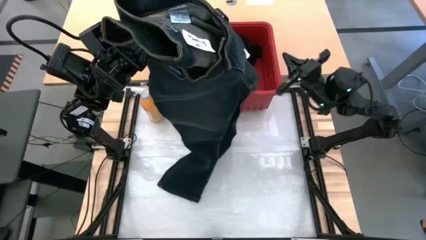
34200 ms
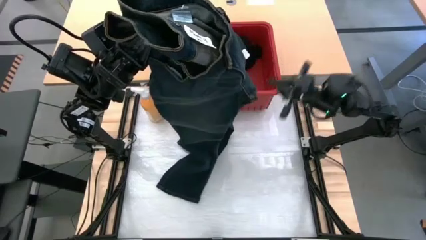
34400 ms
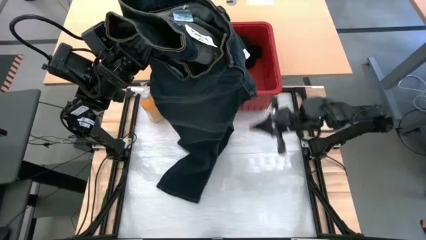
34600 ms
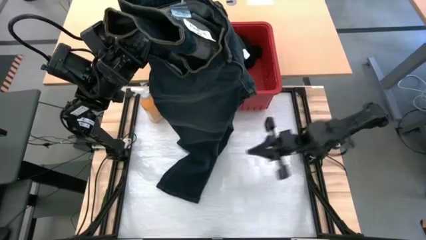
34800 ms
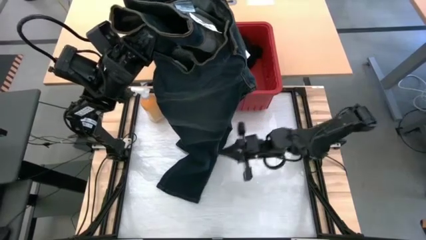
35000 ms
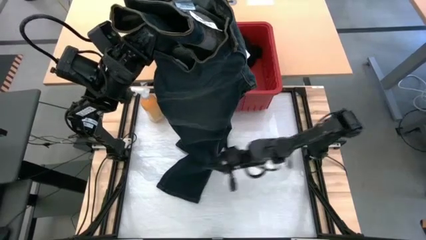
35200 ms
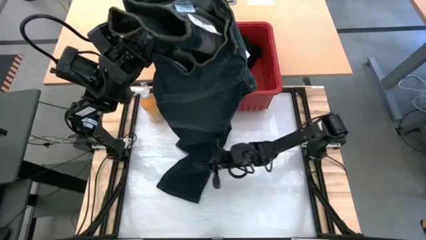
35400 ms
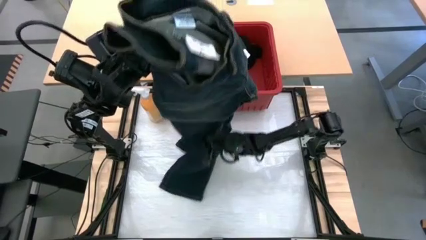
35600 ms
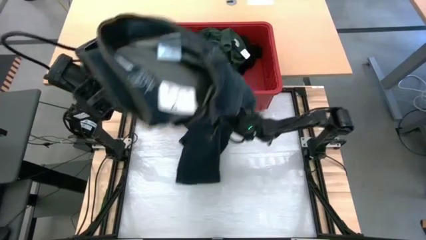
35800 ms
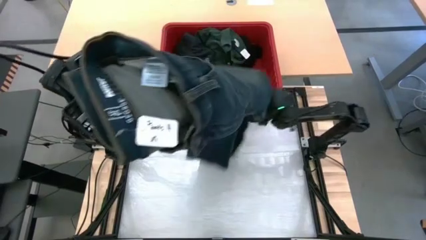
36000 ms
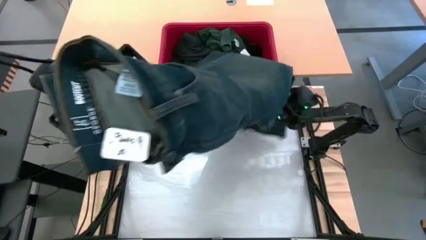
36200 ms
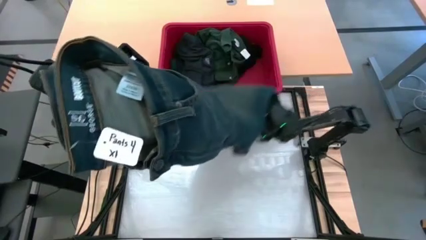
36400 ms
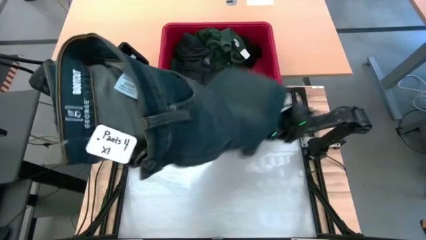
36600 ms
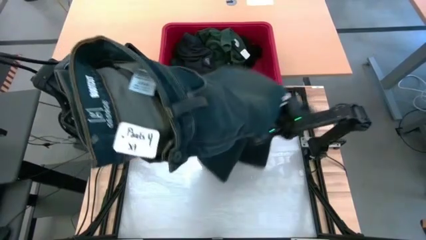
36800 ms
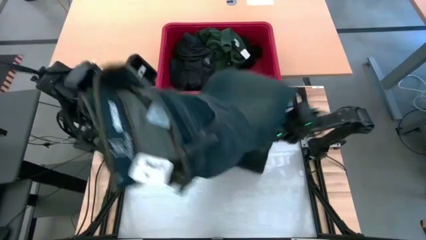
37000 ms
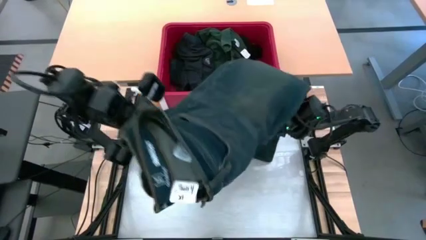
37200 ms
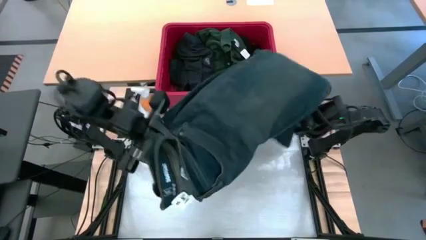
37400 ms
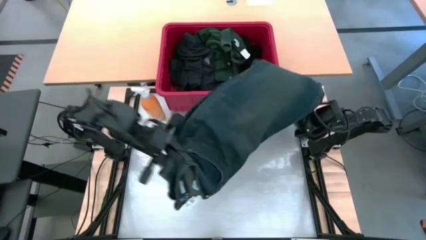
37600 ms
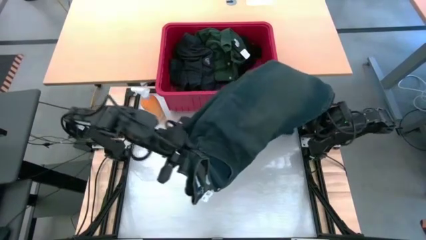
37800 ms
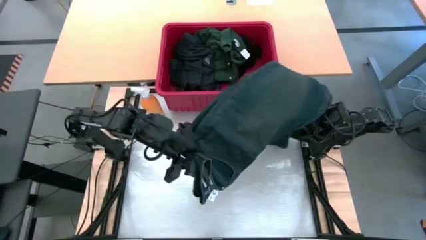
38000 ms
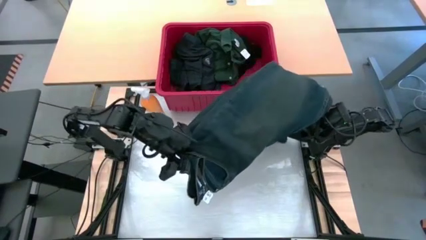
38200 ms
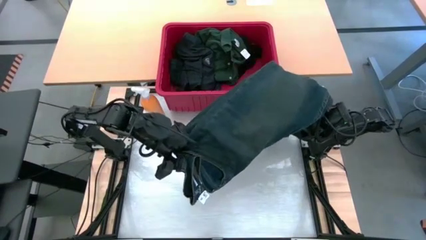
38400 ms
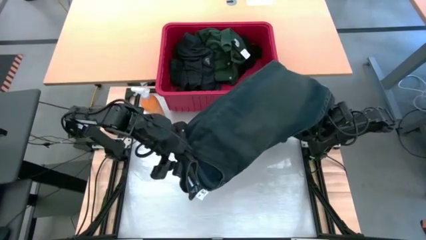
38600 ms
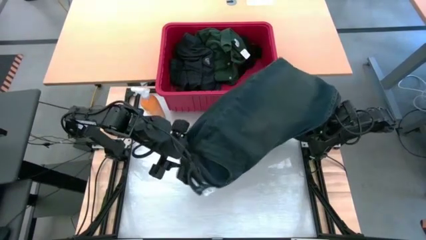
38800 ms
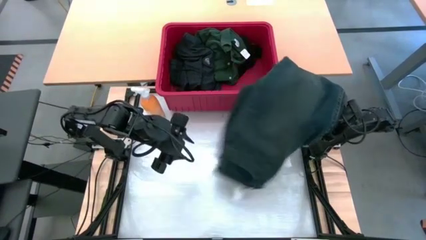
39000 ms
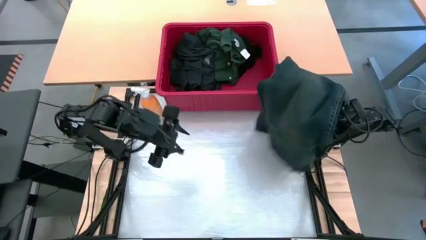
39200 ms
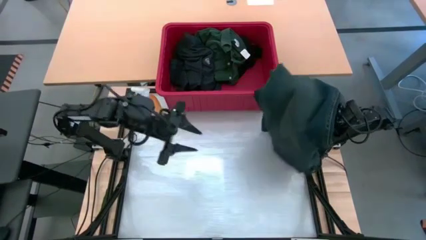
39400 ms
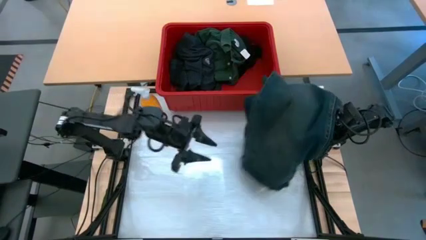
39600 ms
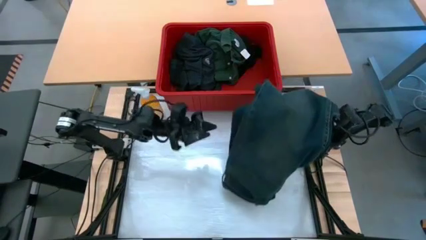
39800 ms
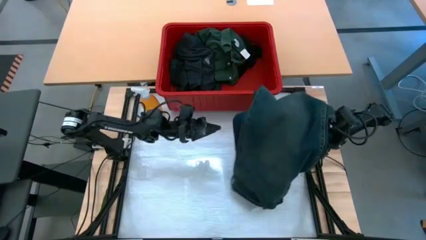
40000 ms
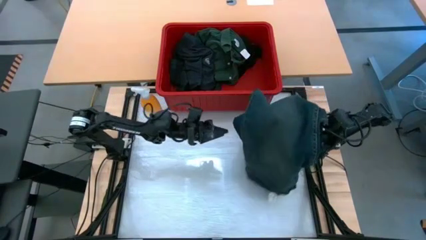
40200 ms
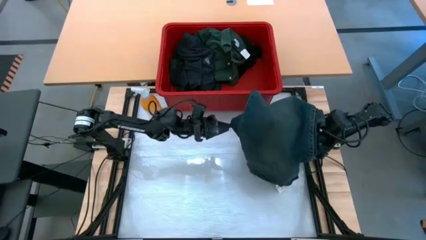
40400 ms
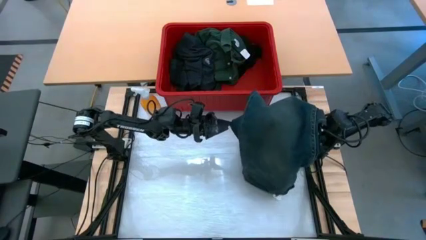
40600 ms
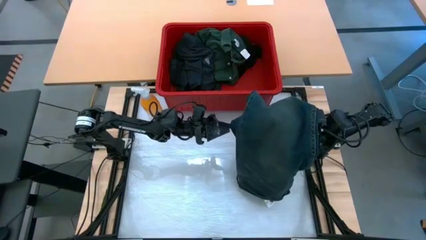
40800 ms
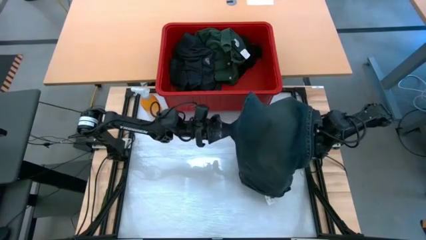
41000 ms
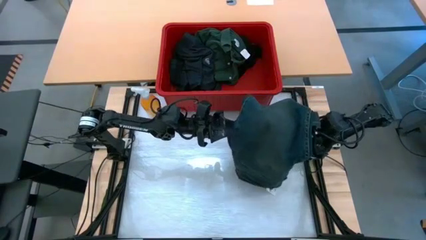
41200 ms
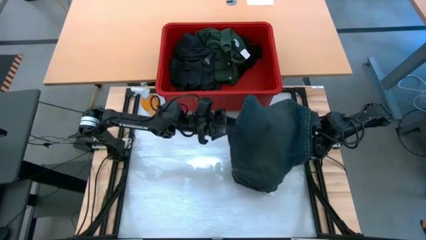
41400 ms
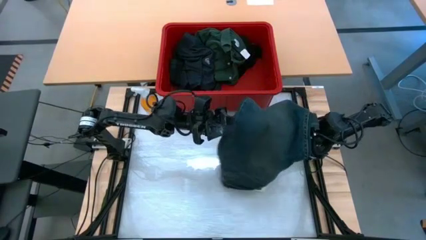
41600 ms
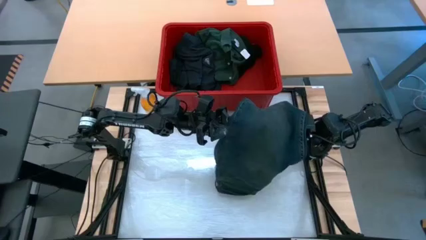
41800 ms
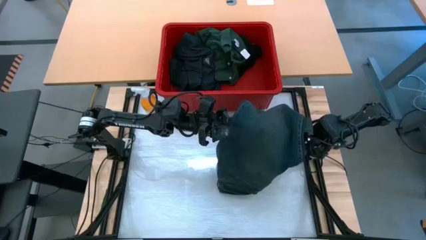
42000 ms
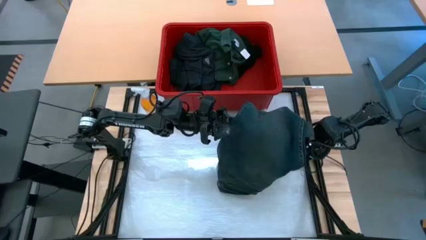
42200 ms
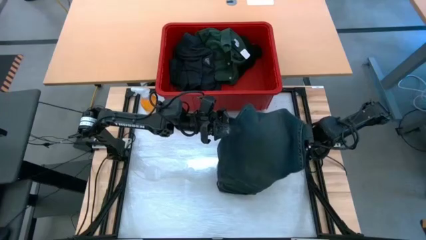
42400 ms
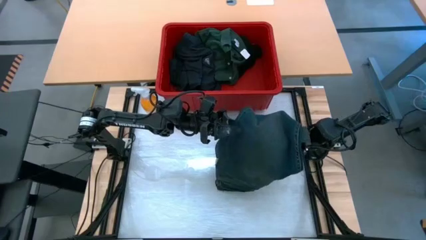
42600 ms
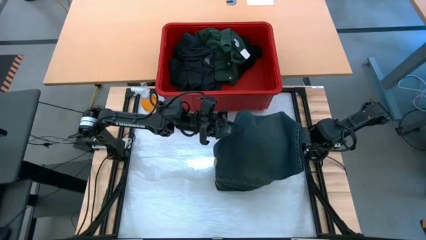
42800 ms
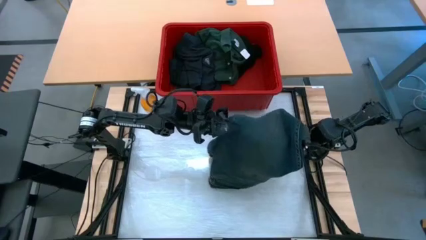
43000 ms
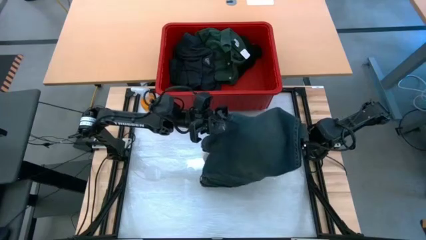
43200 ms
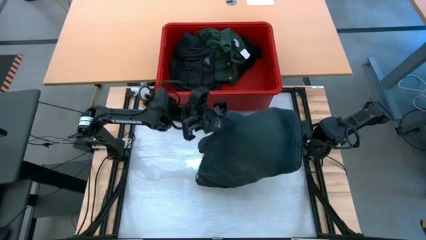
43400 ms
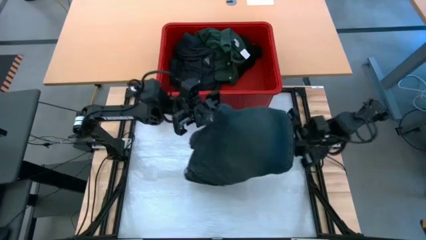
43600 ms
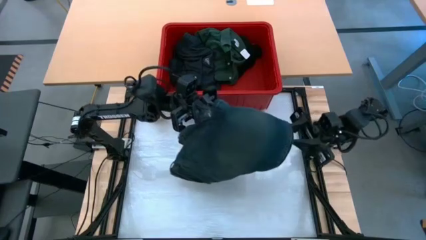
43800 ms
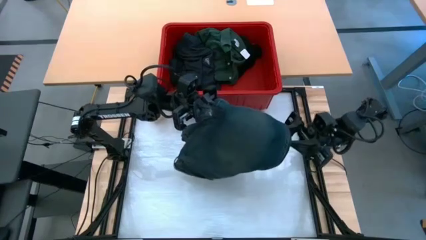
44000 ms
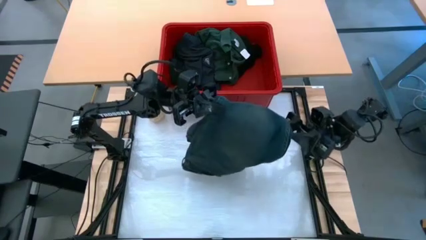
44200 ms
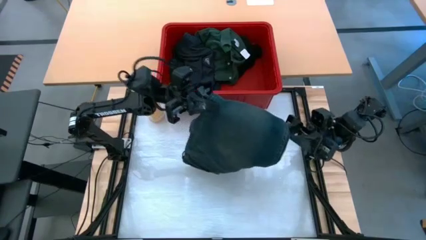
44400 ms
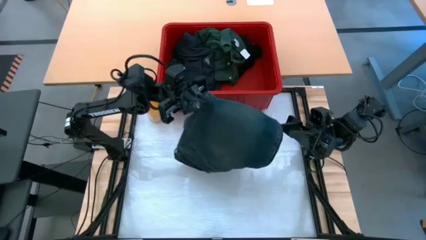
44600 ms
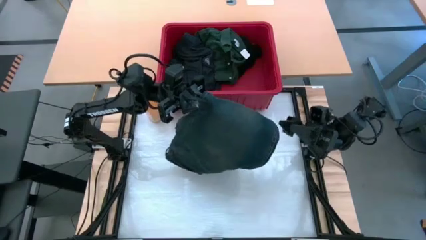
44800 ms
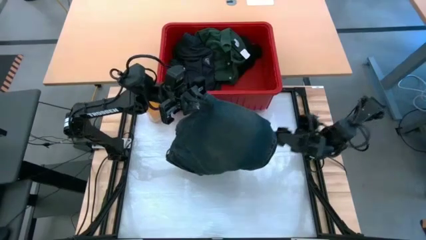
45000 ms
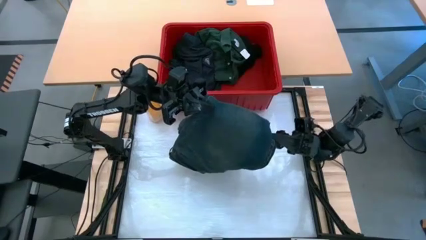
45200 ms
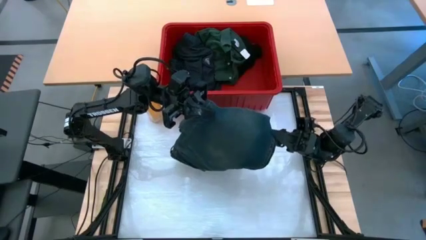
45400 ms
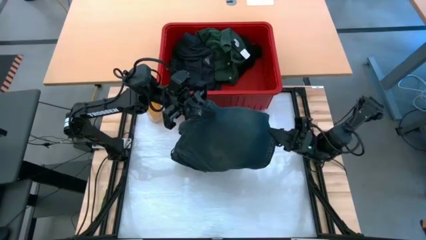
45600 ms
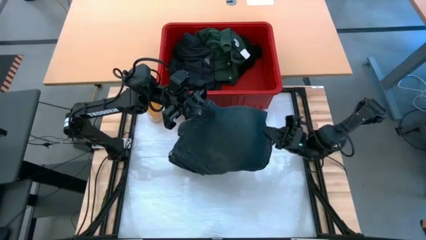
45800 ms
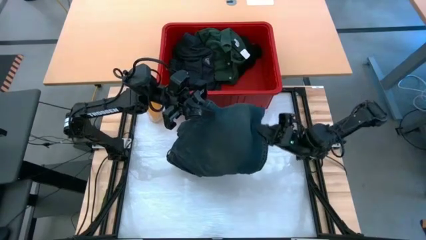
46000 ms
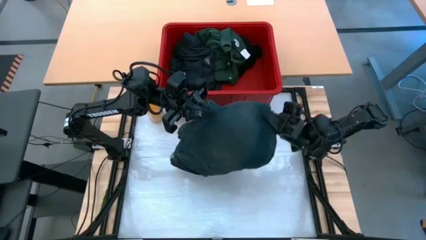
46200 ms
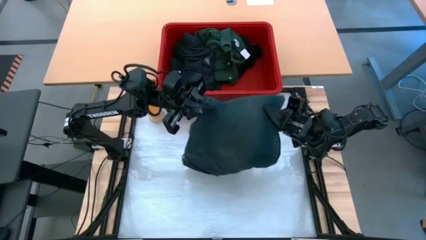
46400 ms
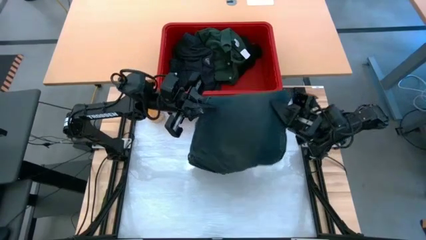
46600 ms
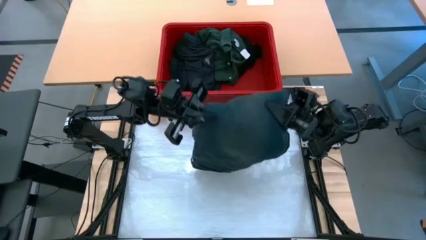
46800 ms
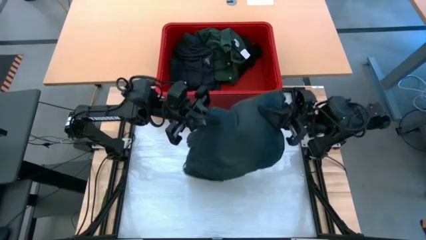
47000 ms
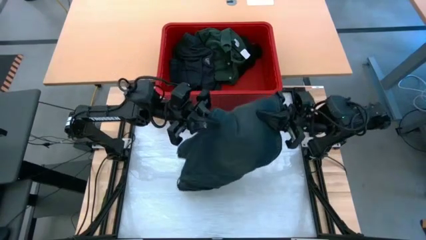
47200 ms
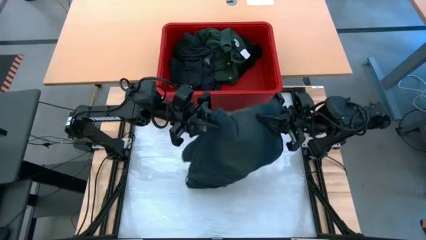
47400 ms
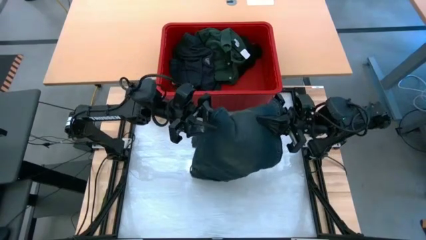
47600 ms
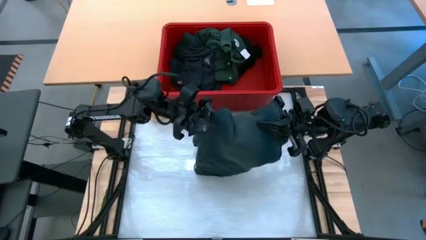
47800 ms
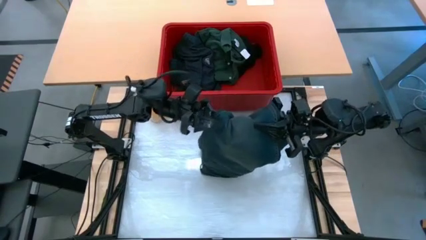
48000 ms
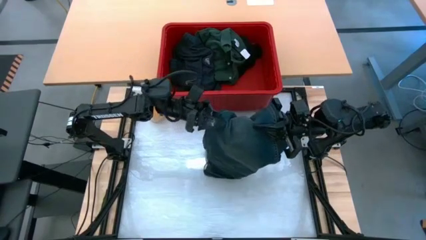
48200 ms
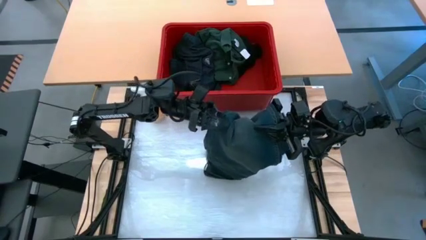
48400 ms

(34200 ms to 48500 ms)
Task: Fold laundry
Fold the blue pants
